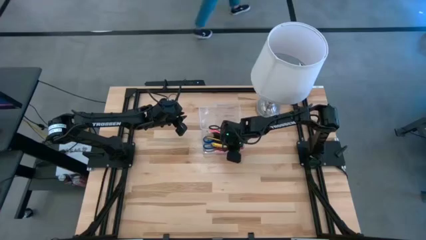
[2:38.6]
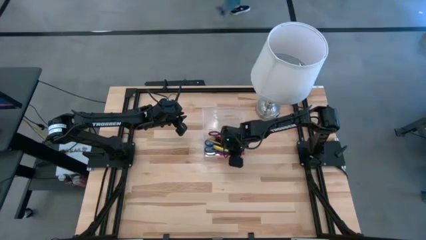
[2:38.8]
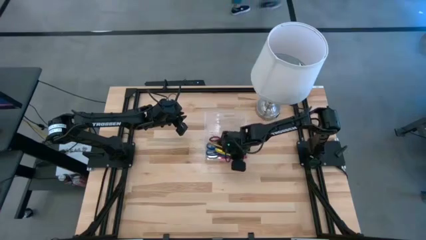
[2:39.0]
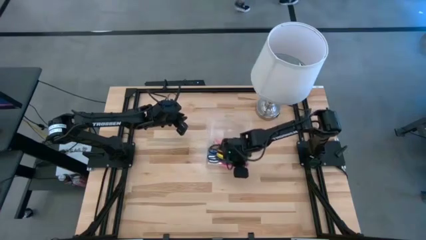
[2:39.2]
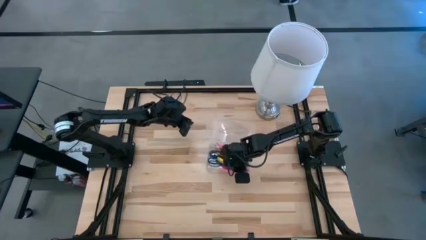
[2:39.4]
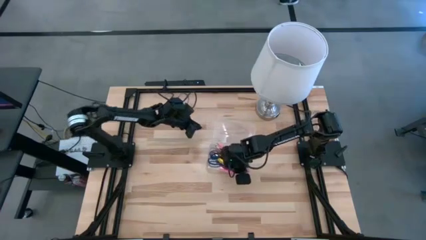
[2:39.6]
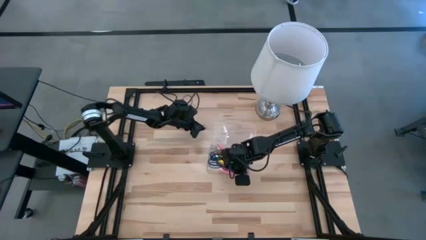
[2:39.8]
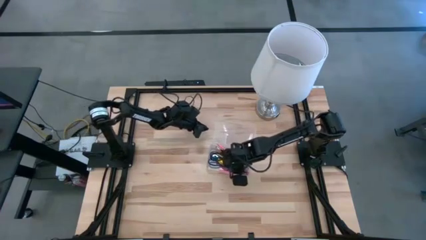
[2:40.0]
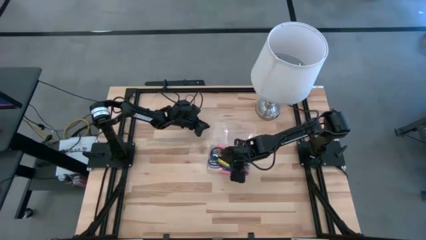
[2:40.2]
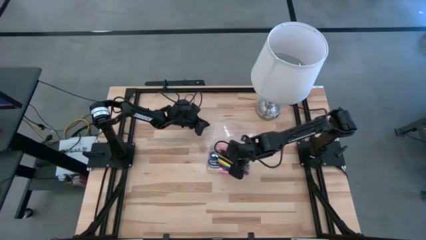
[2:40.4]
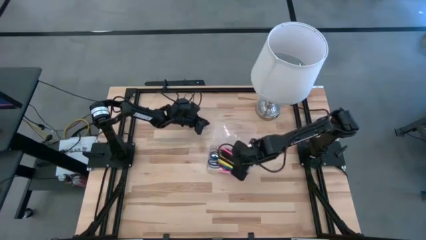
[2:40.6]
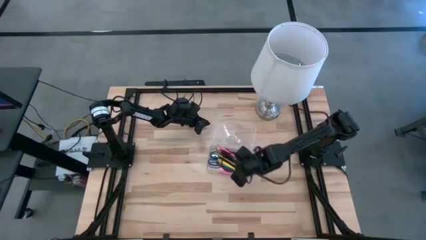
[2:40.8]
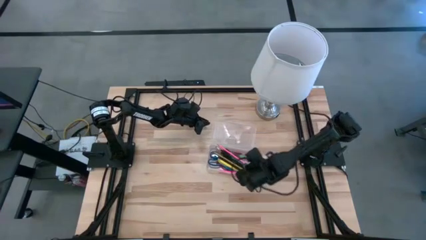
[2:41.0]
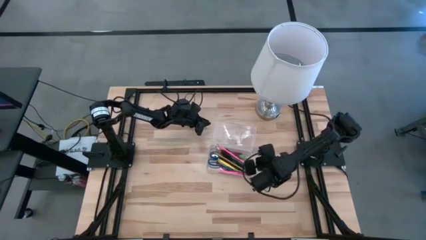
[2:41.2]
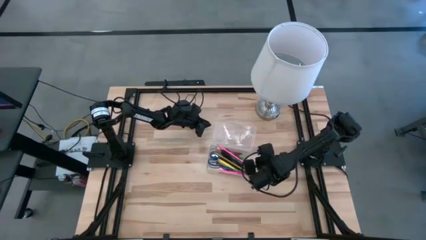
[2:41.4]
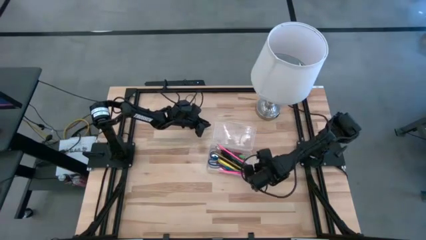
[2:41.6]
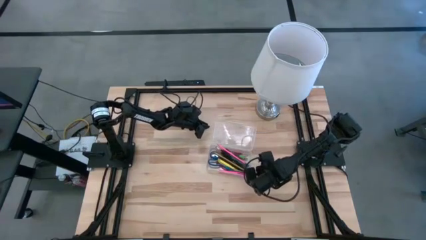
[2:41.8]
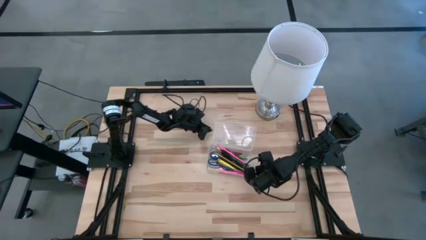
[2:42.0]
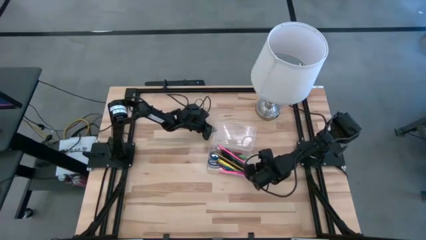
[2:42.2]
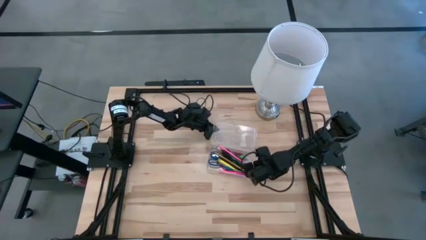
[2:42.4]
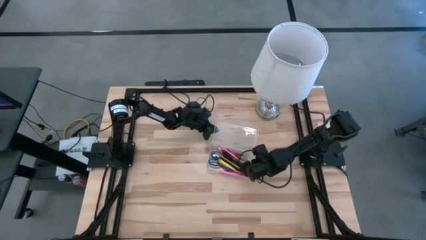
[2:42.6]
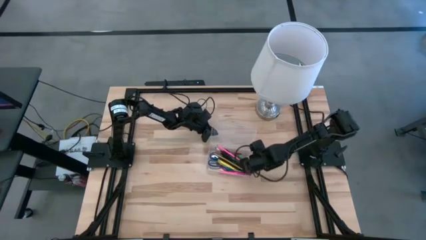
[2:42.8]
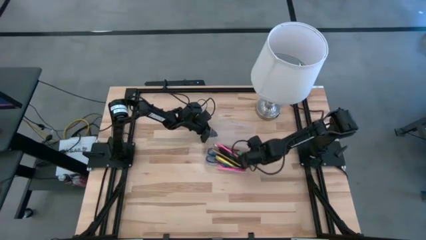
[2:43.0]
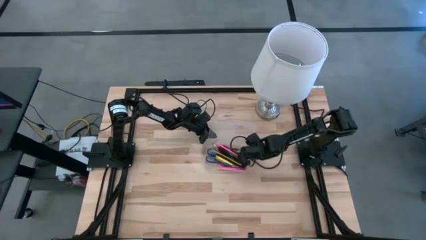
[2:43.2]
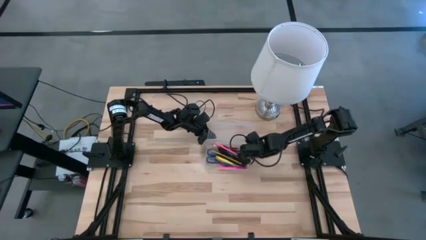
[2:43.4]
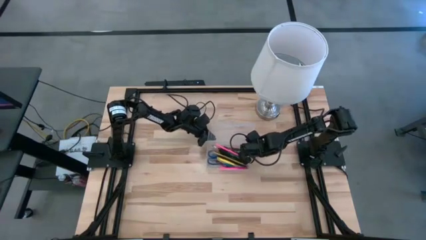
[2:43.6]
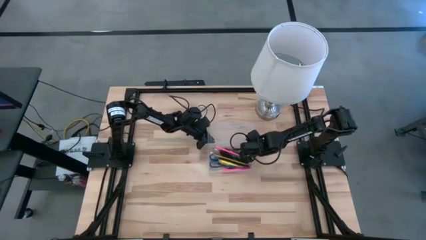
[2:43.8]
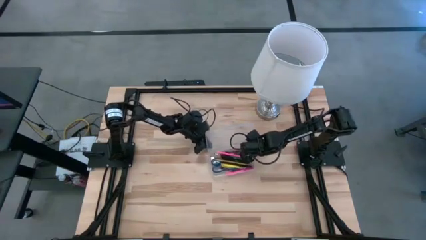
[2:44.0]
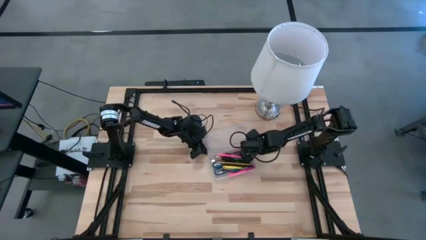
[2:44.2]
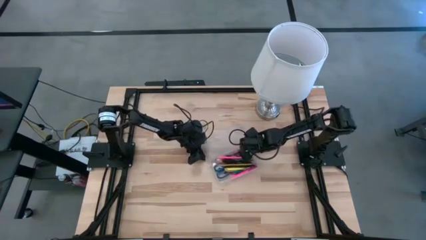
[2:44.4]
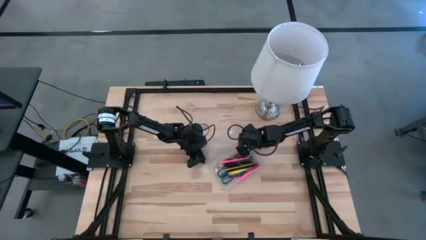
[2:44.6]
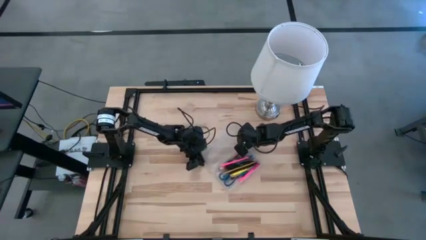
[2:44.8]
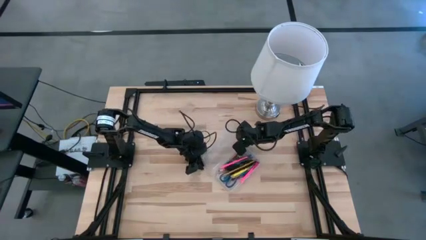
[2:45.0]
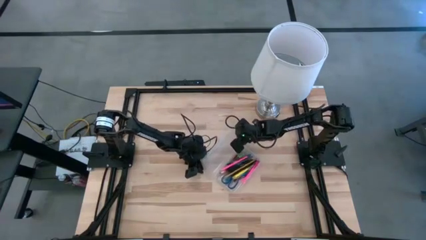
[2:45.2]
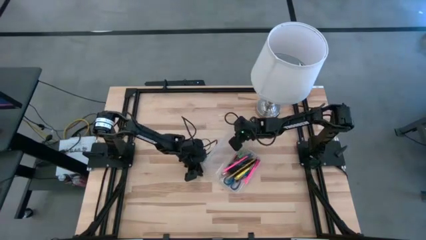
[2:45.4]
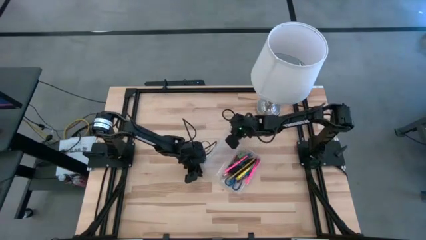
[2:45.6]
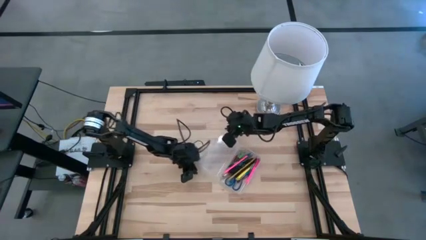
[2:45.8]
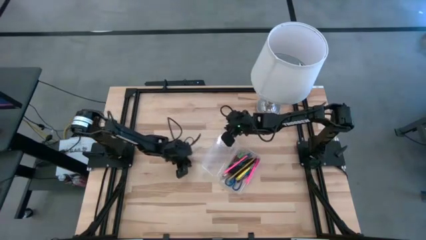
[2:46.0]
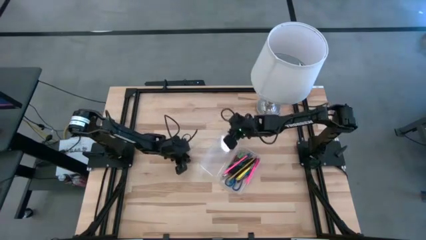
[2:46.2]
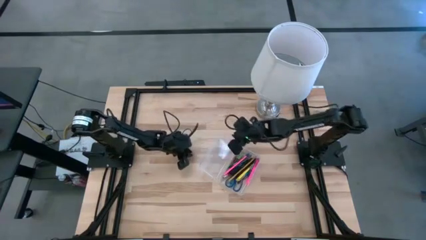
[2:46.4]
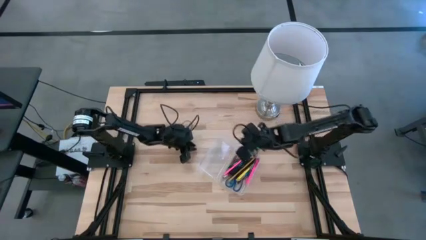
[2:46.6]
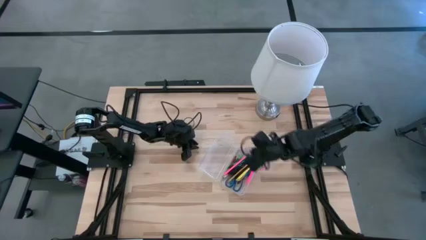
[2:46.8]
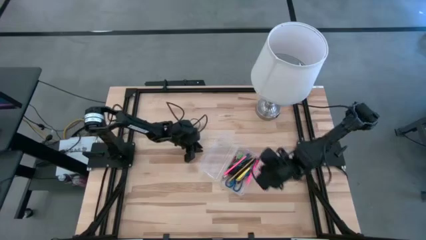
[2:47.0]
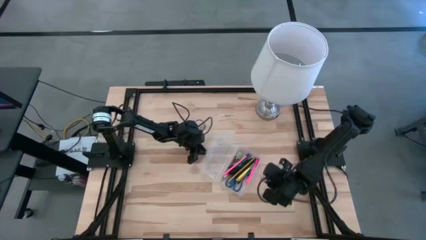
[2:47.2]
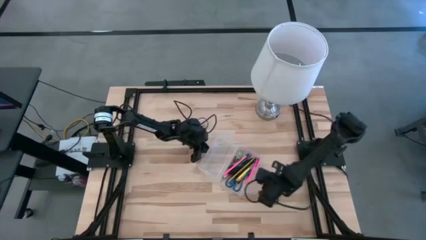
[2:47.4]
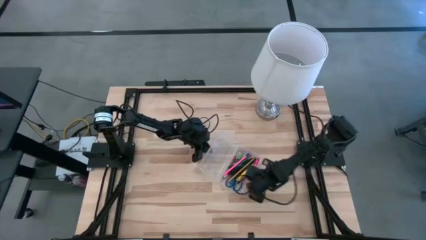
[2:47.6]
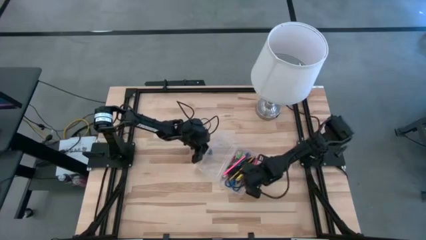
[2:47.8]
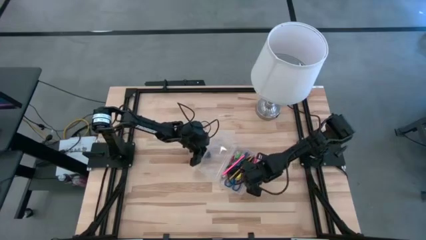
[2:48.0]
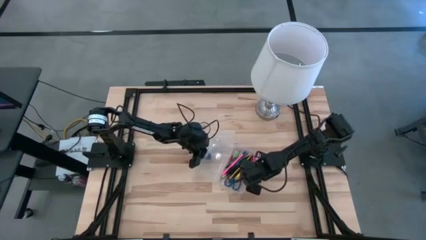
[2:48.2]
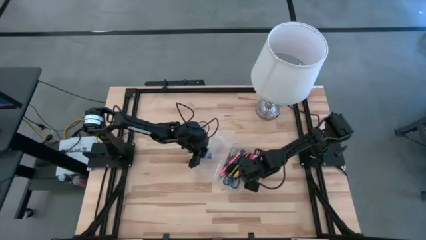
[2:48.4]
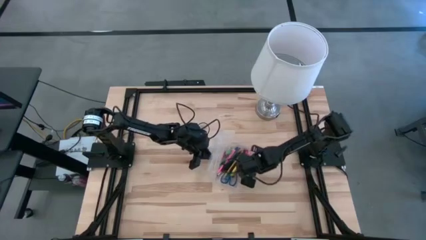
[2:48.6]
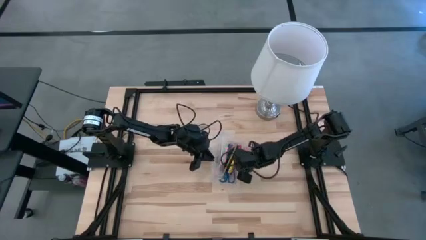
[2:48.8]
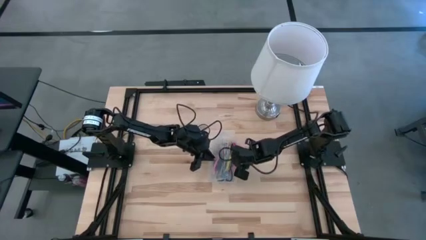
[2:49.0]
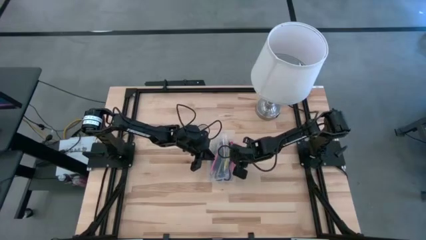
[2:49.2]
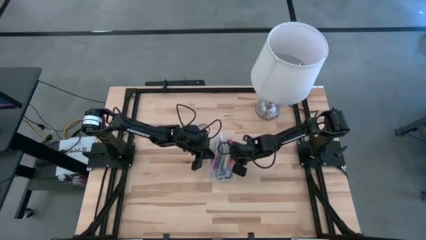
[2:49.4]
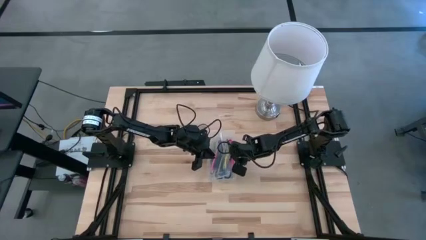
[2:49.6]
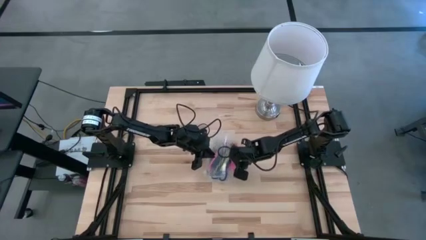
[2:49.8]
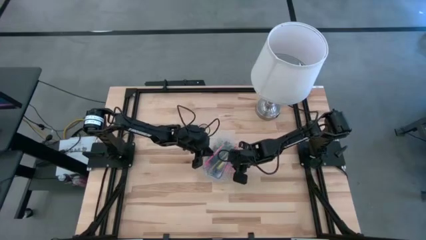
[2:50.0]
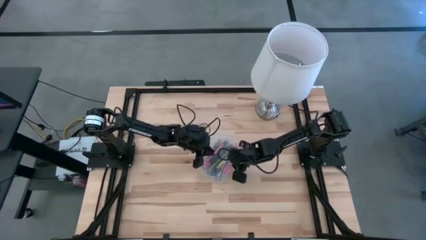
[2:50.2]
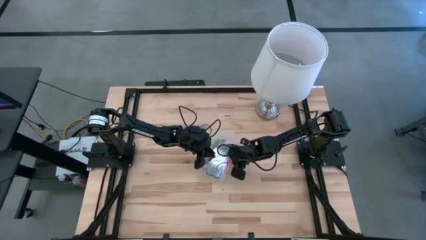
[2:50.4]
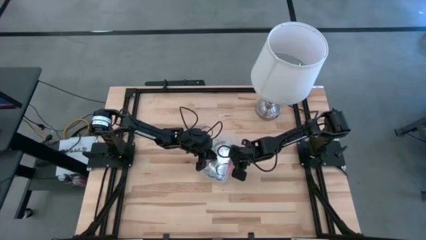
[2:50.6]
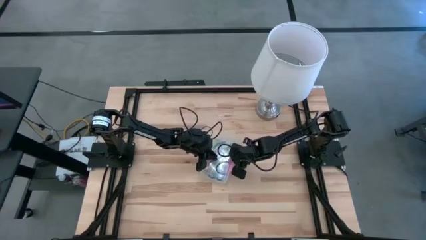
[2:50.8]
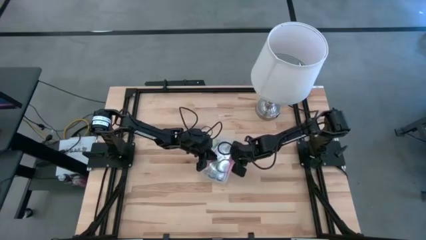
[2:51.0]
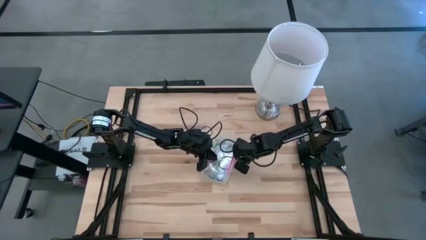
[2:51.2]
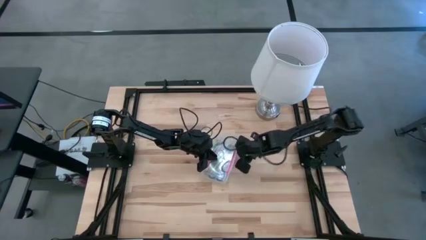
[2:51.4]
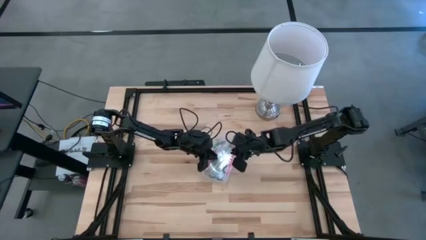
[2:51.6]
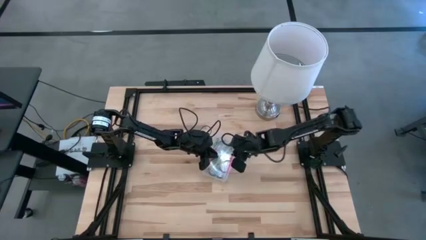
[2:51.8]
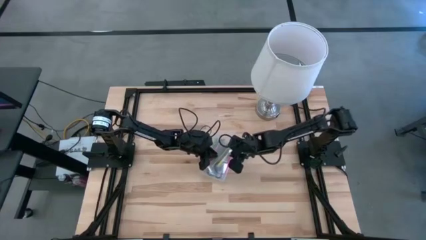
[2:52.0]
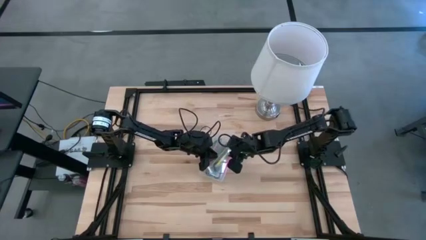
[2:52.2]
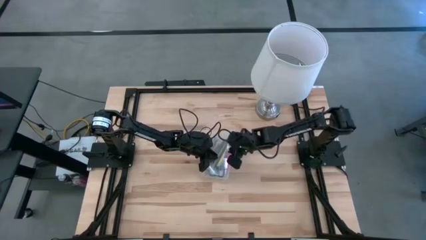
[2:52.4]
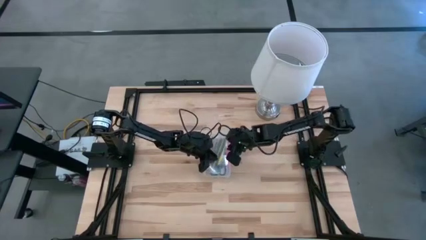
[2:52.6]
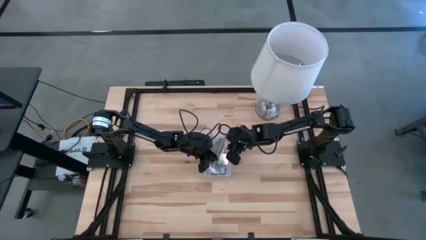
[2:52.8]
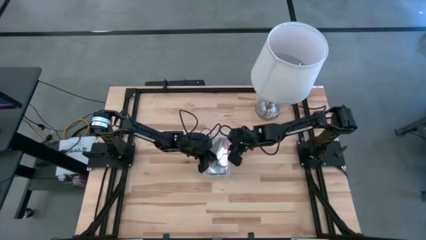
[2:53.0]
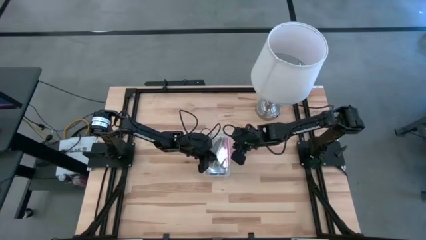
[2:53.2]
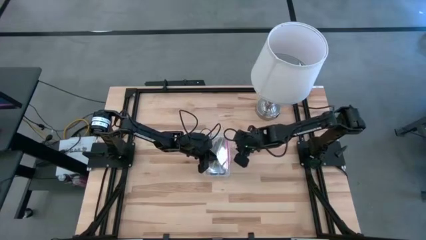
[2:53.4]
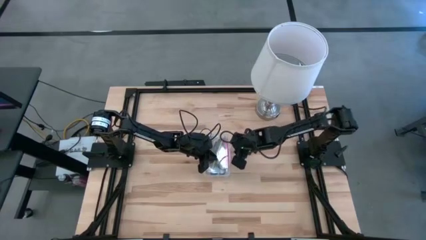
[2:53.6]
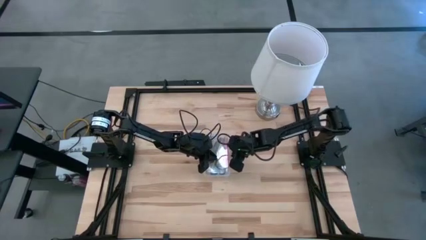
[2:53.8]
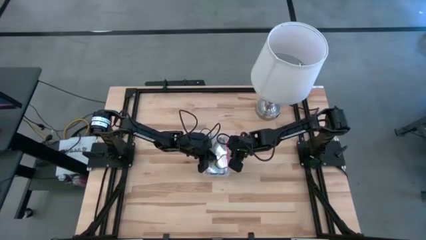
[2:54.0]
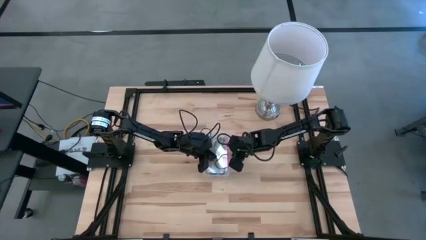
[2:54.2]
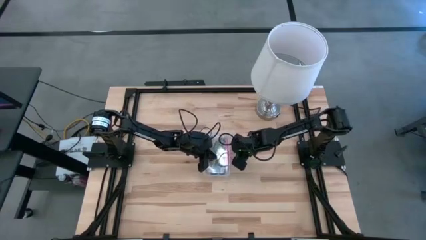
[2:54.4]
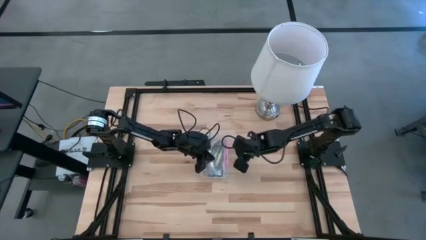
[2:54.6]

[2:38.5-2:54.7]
Task: Pick & place school supplies into a supply box
Close the transparent supply box
